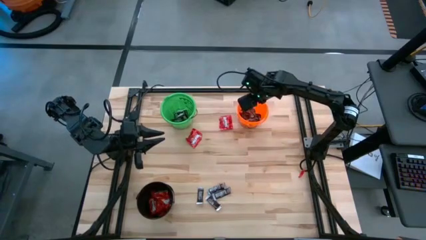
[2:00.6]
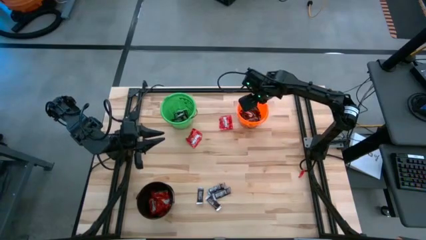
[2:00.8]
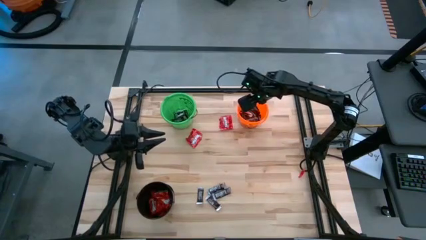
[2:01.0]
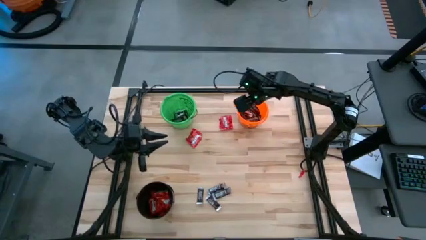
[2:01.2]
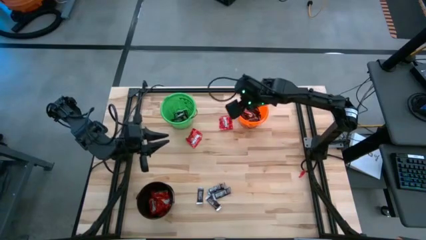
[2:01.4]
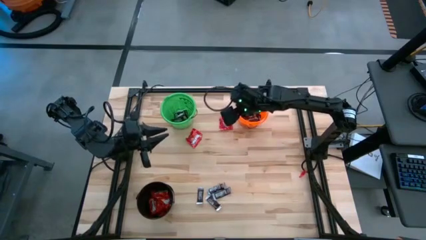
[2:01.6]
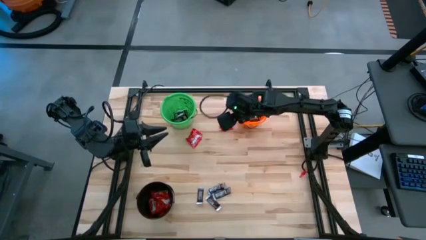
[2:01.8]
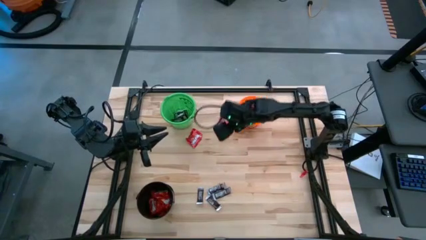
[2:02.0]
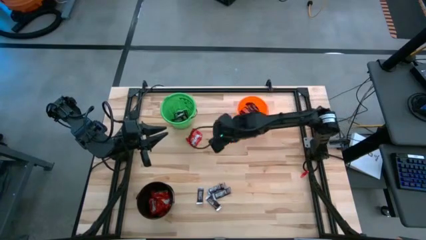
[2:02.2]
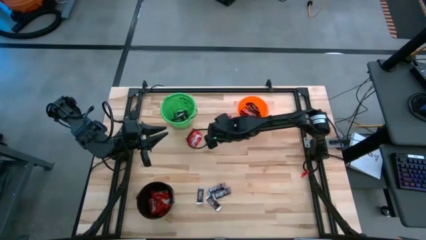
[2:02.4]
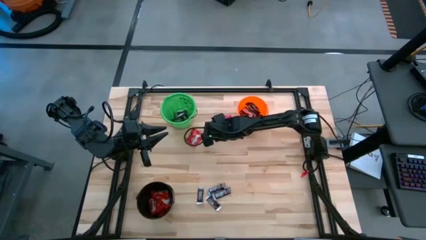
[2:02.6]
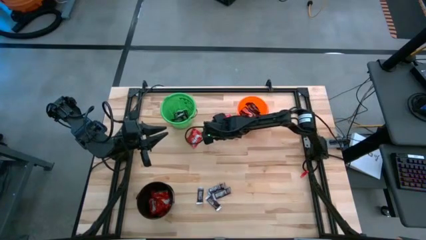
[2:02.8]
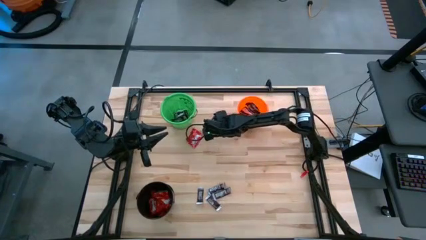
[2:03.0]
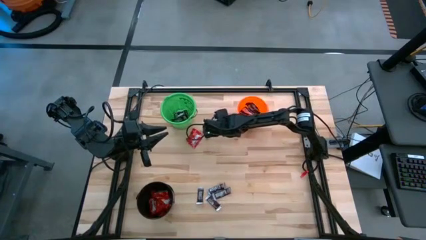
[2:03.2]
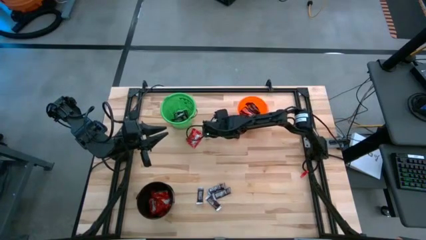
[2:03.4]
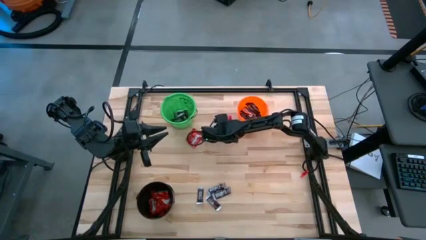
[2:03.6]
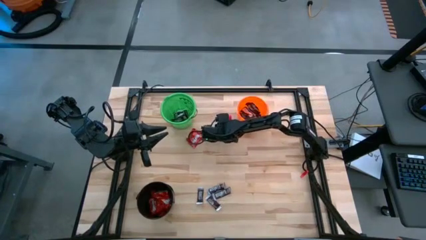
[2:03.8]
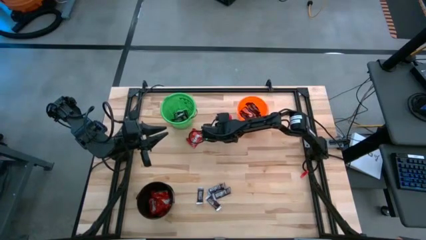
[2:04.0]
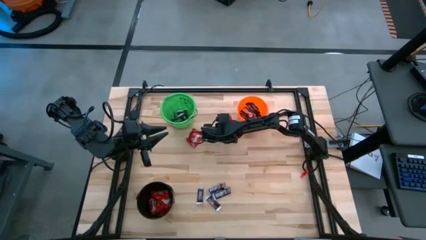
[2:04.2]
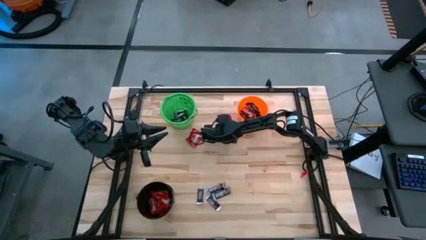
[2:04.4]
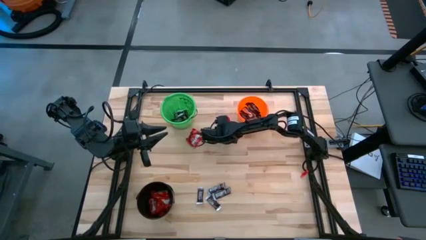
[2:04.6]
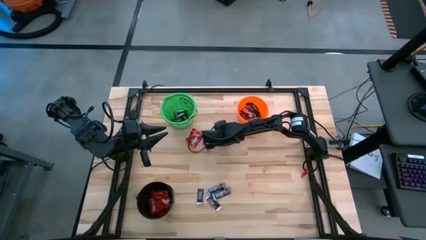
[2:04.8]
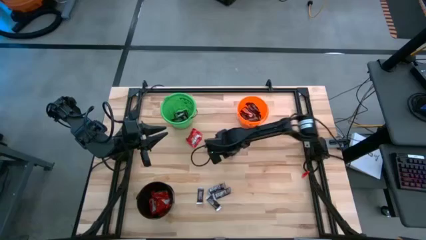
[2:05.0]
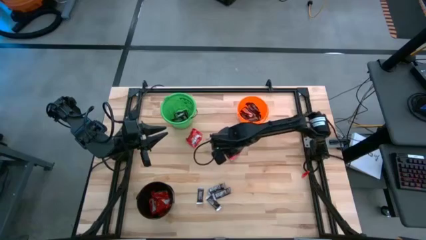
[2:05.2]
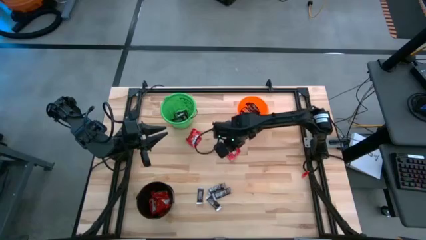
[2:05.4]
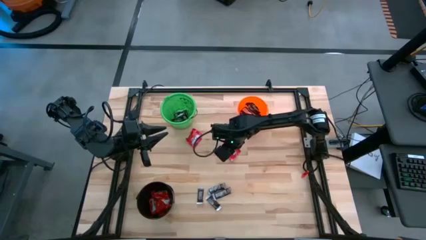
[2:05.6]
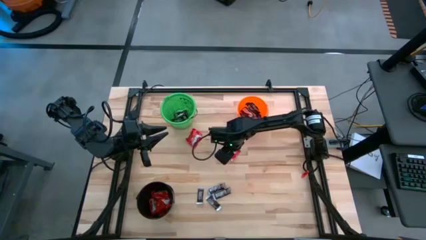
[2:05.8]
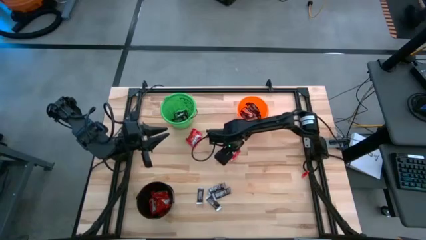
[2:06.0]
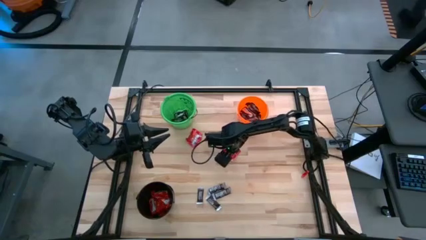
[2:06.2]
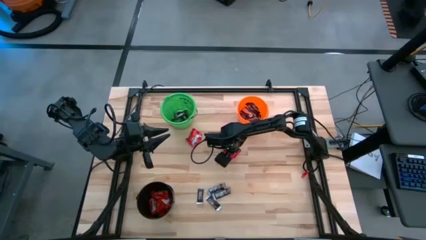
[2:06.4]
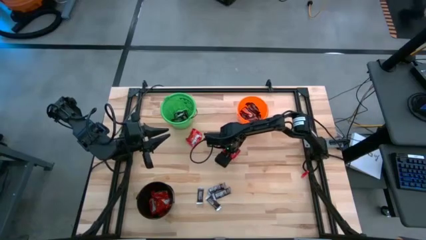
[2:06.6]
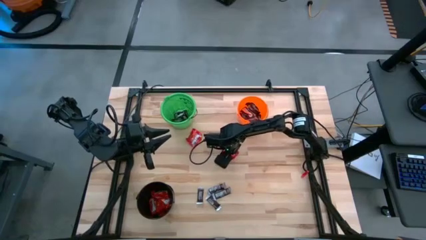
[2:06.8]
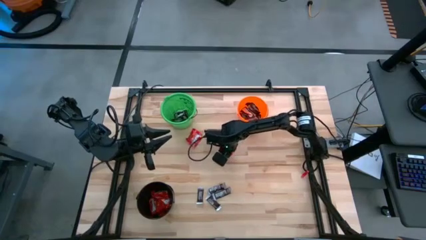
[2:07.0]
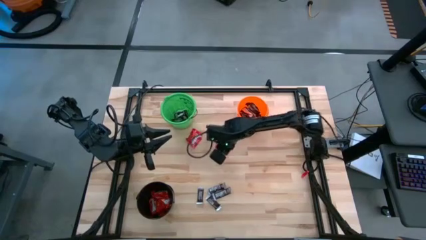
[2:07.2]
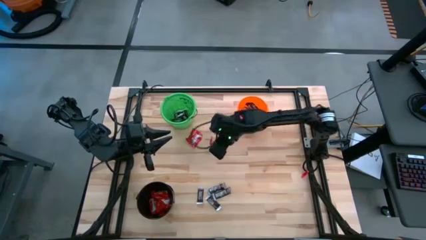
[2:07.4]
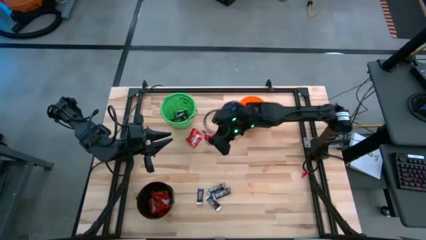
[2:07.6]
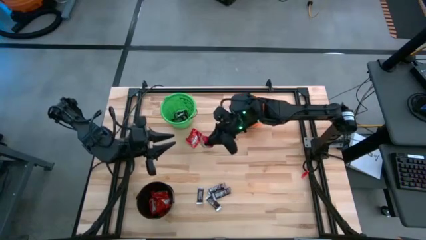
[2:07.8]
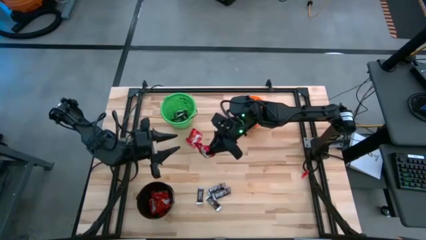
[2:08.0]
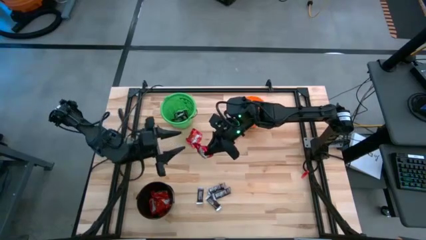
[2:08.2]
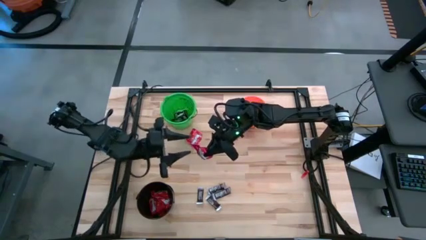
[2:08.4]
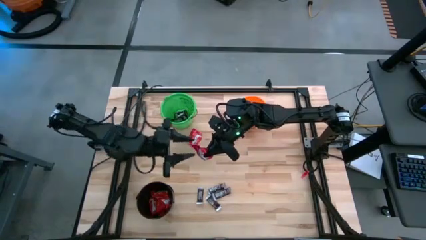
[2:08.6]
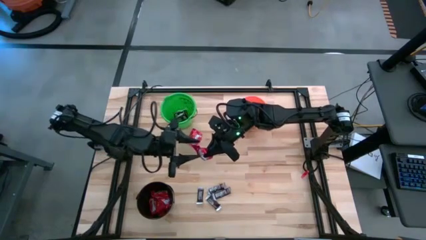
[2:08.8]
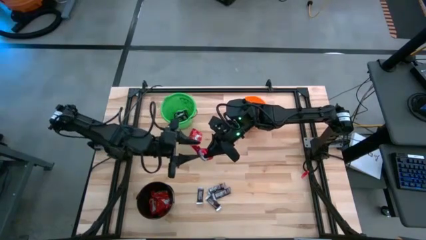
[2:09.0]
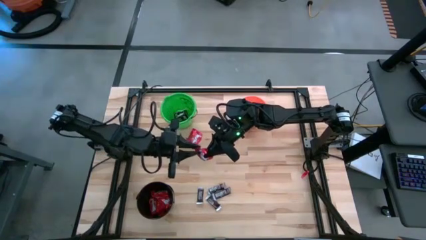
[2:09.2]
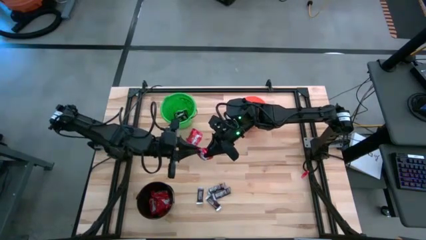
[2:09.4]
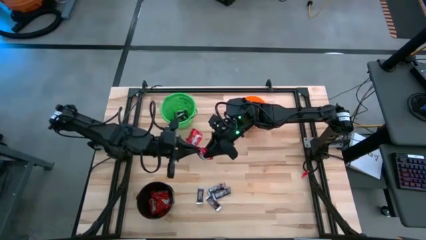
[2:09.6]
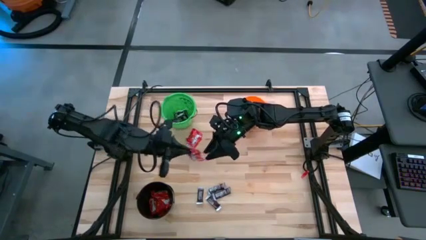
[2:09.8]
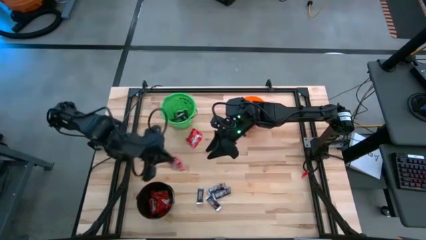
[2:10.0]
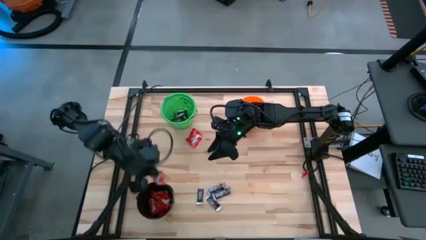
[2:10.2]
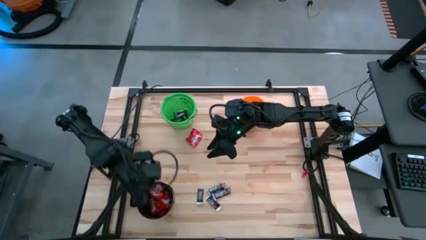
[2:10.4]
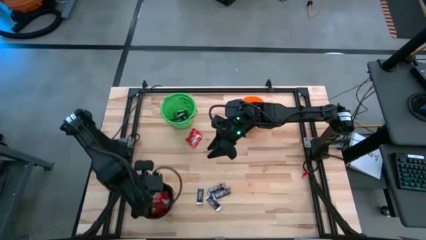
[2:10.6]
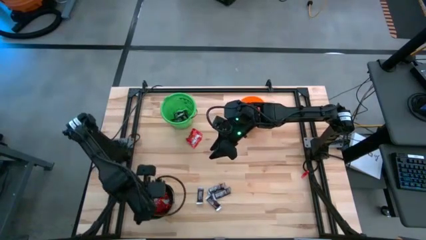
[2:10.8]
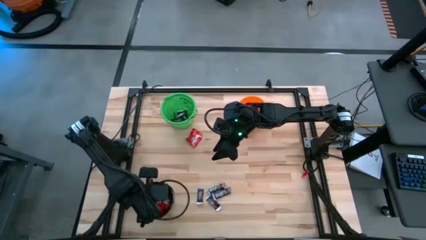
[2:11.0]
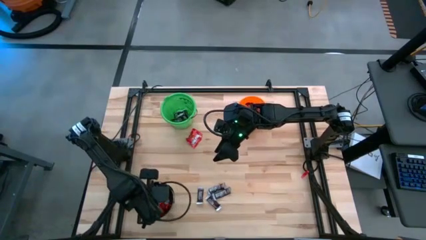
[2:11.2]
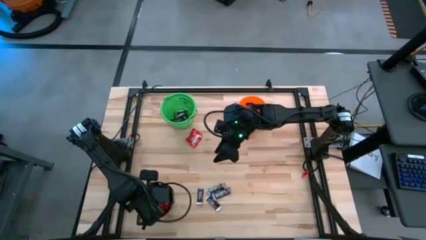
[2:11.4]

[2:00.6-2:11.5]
Task: Sort candy
Put the red candy into the black bucket

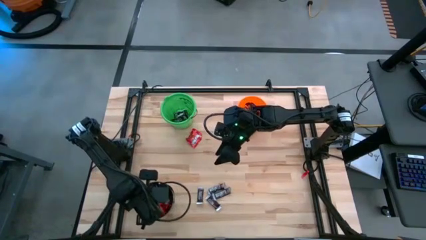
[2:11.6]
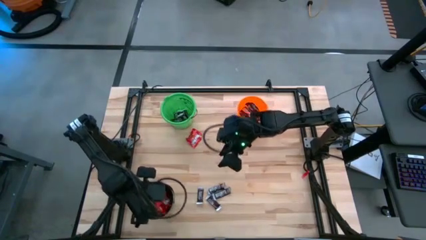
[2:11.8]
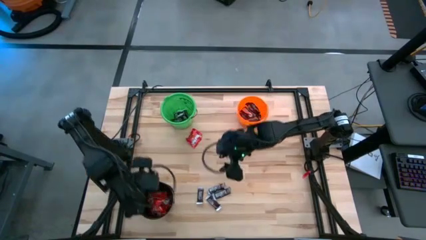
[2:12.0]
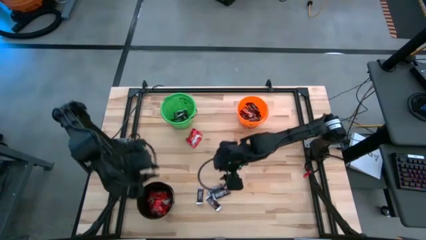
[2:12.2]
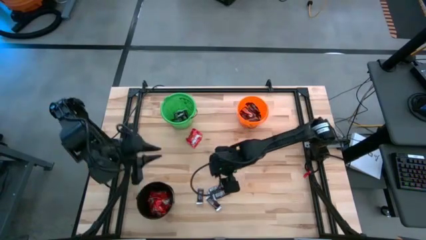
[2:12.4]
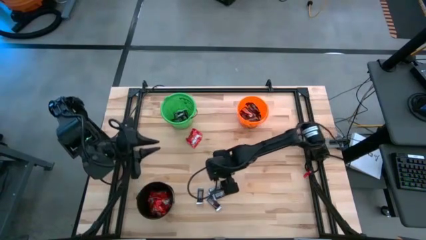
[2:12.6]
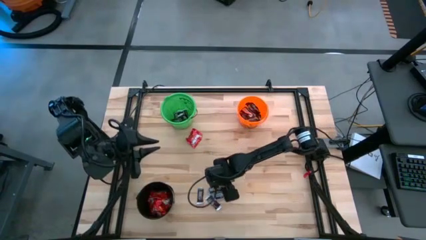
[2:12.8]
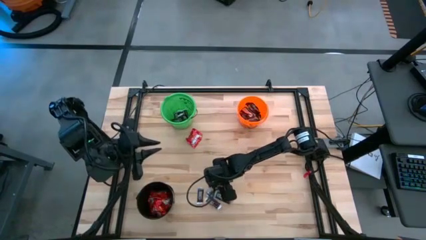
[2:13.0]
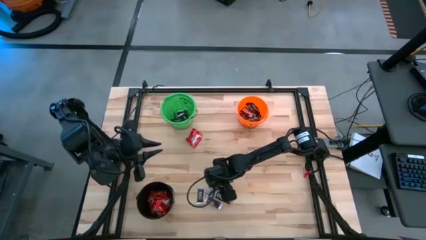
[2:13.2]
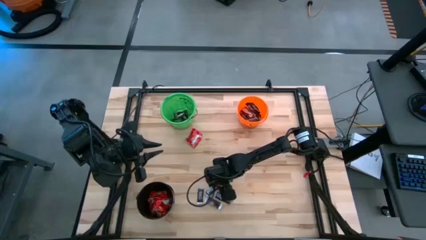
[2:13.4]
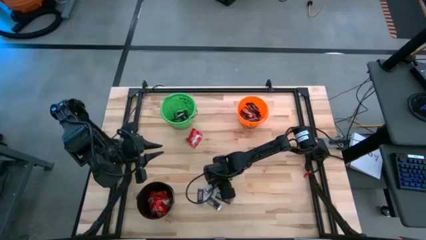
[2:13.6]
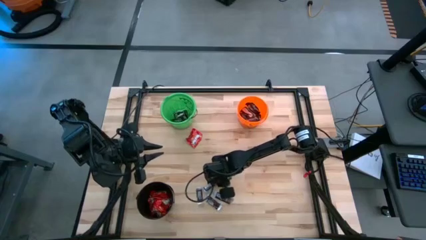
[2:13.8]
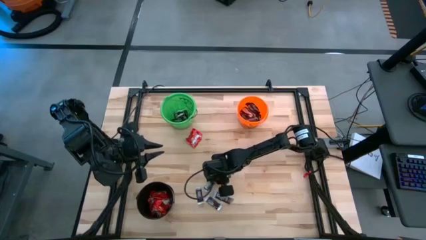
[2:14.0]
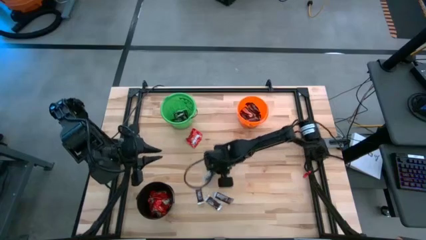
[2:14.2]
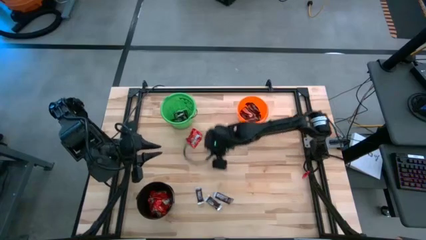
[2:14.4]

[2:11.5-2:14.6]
Put the black chocolate into the green bucket

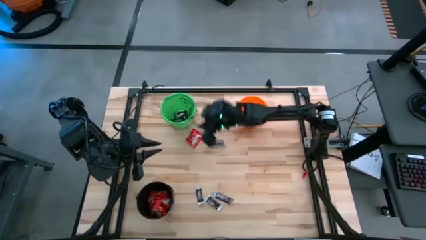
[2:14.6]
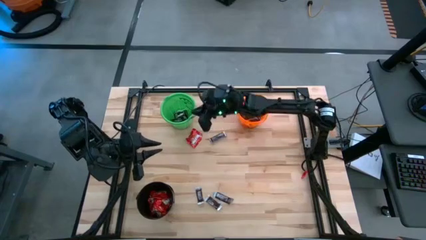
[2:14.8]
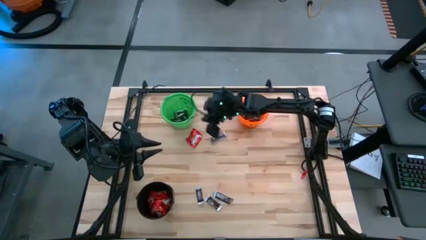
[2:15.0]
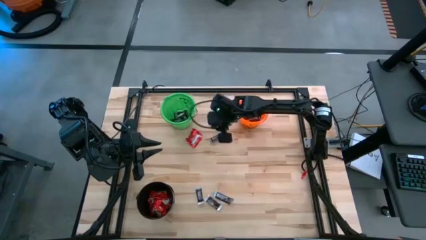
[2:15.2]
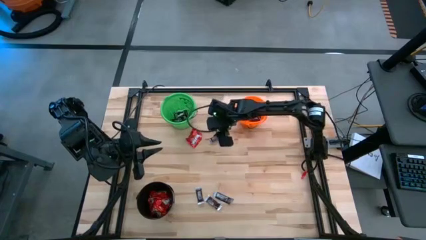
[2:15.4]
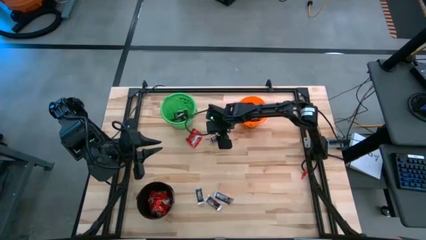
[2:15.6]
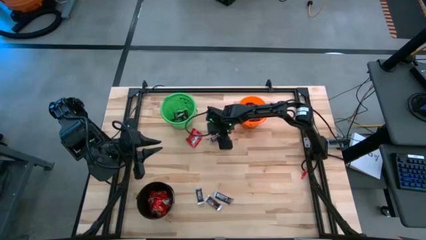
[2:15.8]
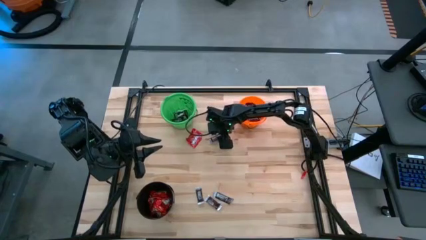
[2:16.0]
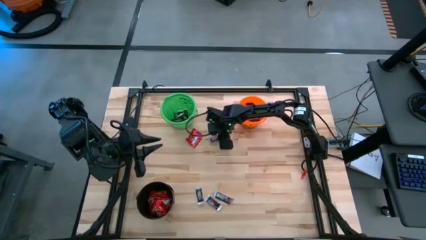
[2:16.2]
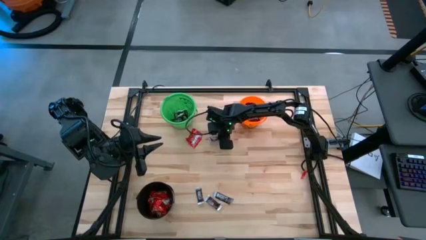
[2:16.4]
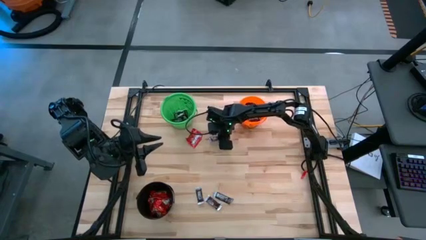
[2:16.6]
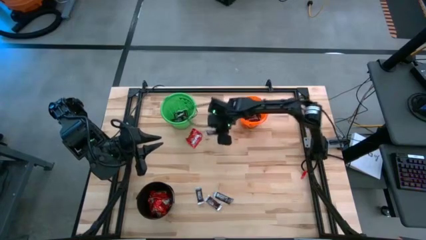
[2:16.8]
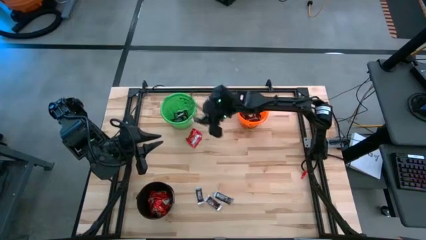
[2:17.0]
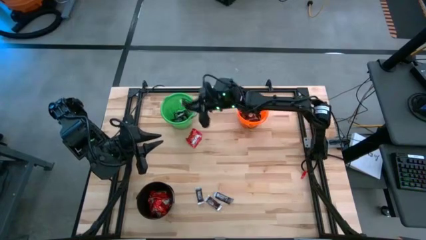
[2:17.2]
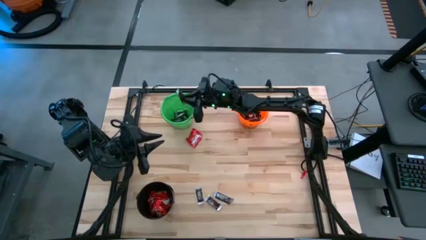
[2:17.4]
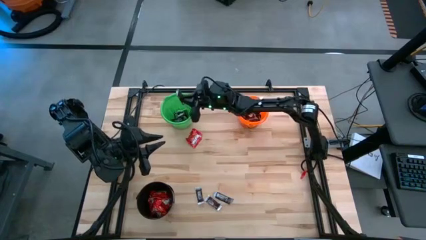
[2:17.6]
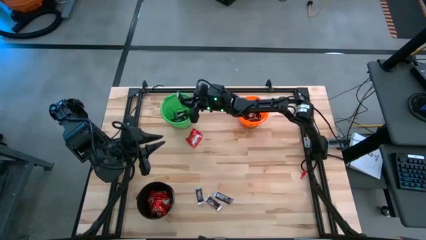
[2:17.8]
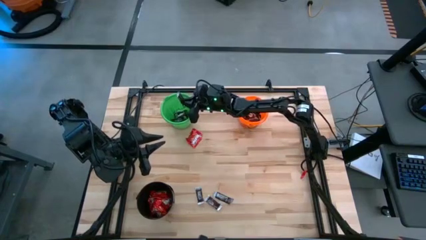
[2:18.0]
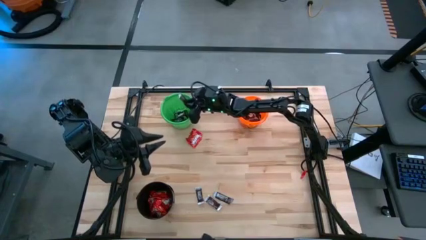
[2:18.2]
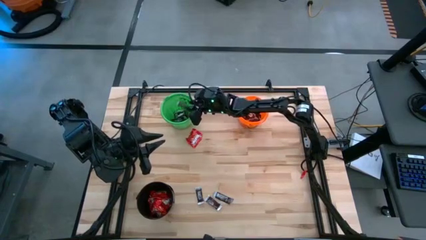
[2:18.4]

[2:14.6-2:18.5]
Put the black chocolate into the green bucket
